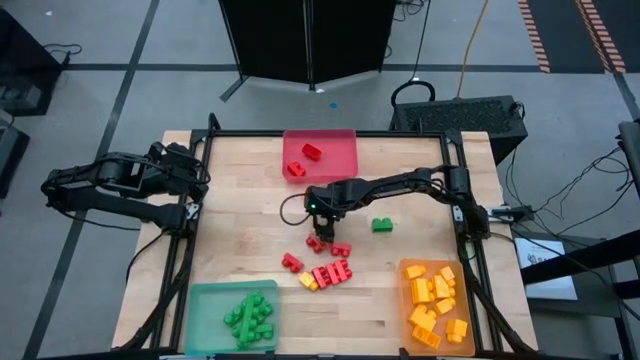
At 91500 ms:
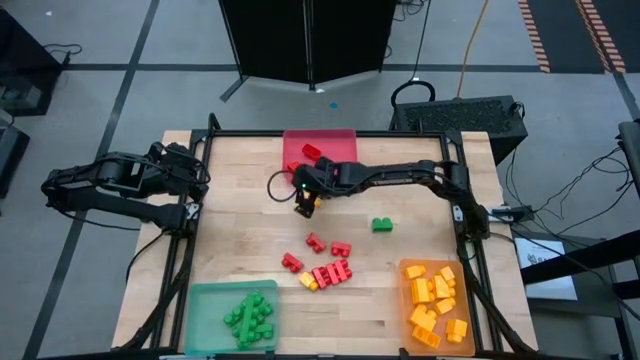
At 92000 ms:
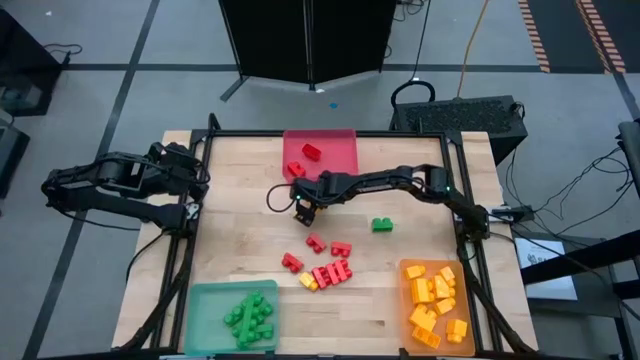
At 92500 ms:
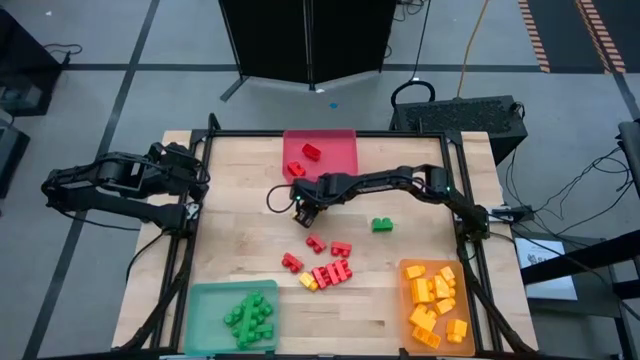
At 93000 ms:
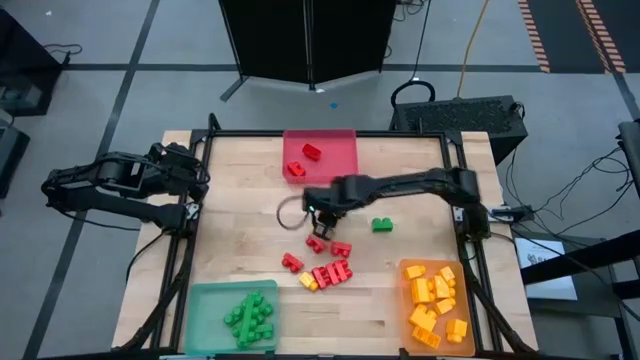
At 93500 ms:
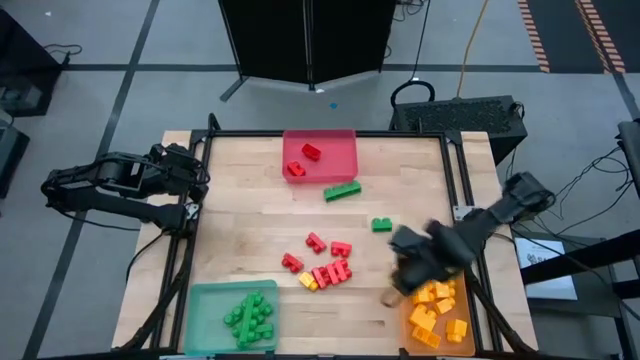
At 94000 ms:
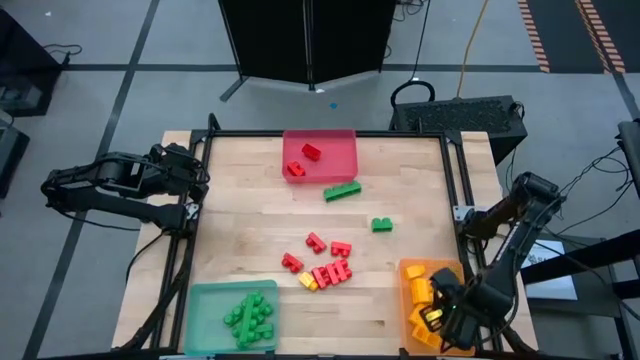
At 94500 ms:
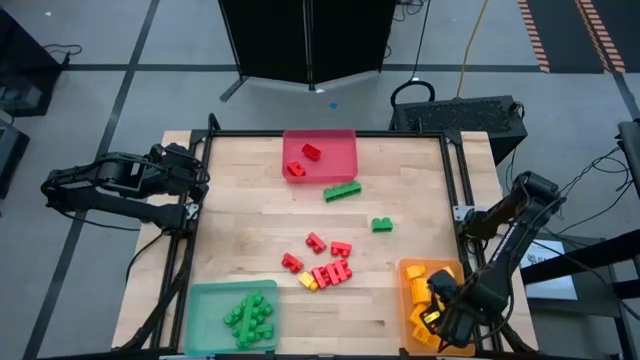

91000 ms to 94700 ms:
Task: Sort blocks
Put the yellow game piece into the orange bin

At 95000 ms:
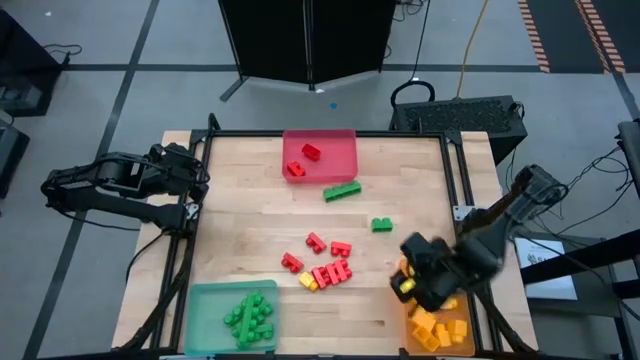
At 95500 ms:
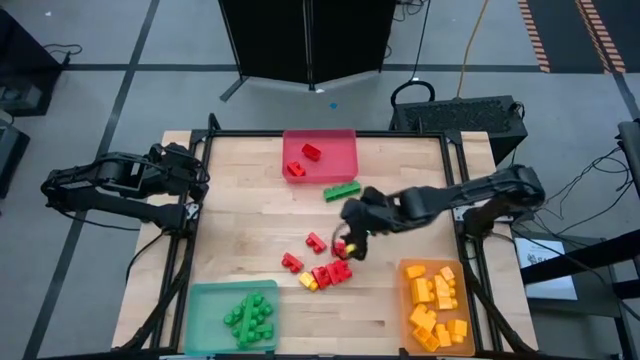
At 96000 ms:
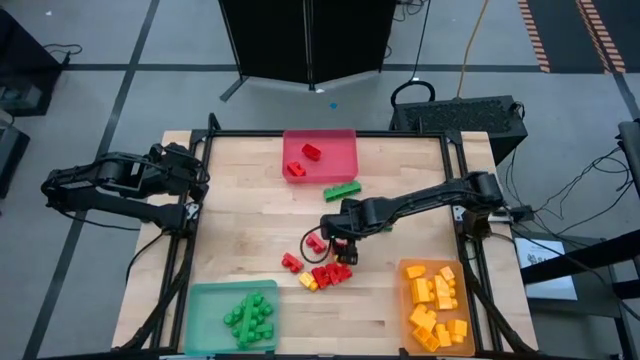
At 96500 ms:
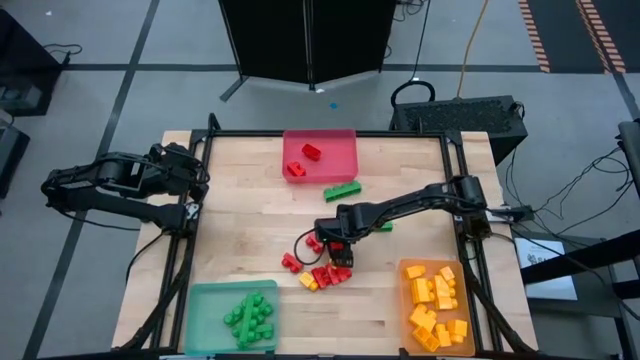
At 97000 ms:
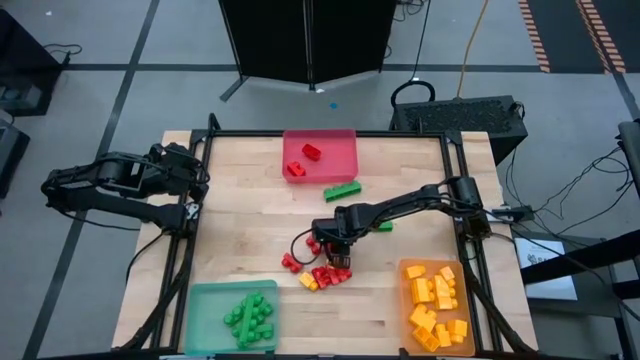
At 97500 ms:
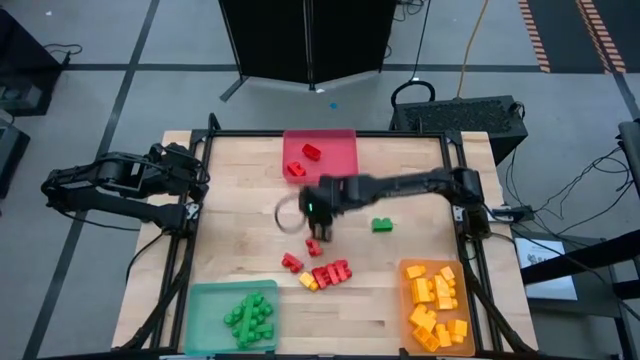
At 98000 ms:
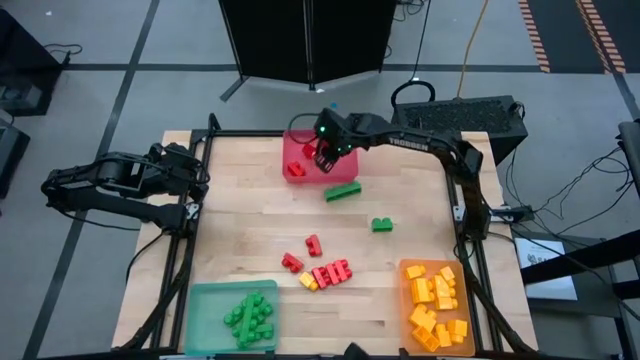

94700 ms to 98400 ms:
Put the red game piece into the red bin

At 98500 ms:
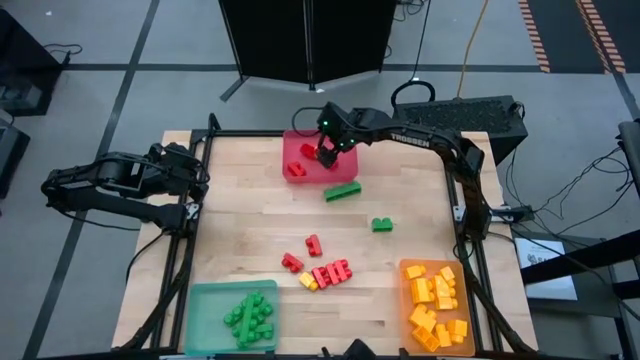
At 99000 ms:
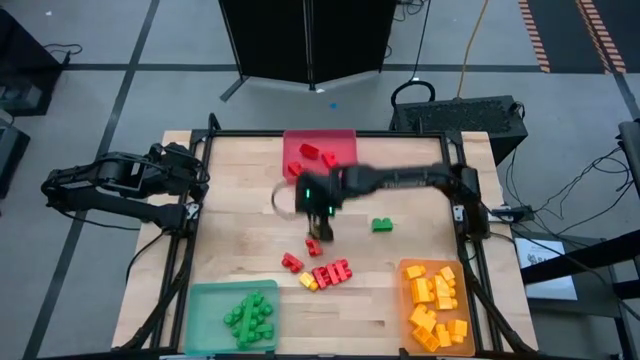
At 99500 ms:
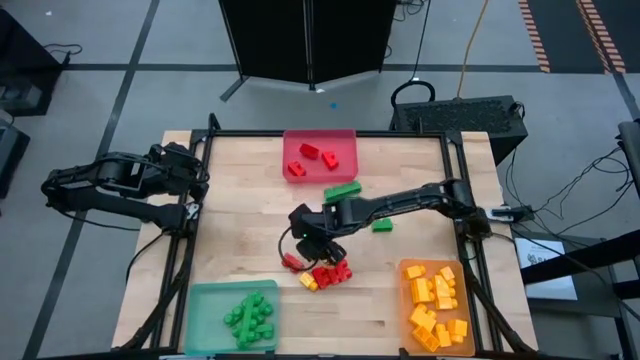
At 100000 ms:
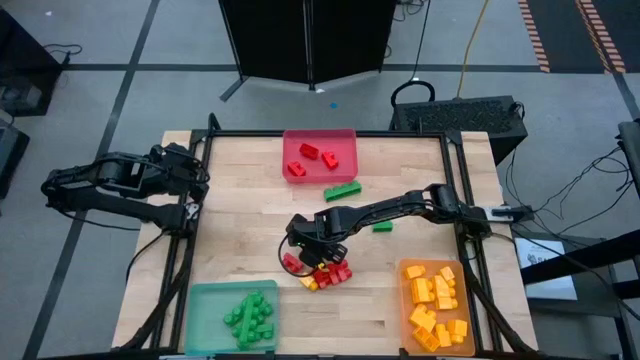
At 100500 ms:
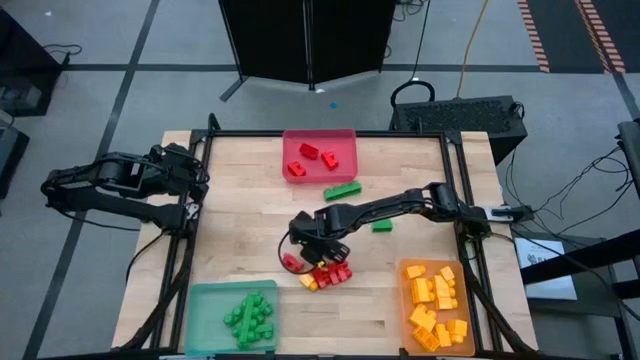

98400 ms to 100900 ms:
Put the red game piece into the red bin

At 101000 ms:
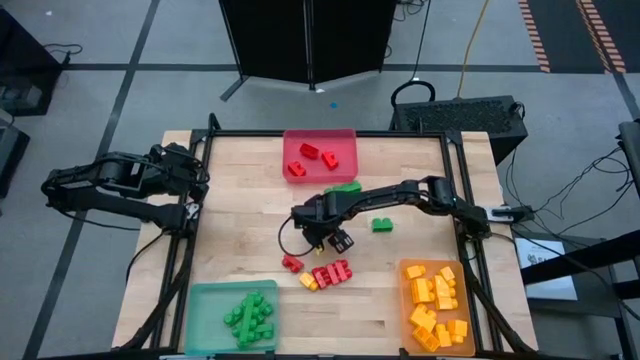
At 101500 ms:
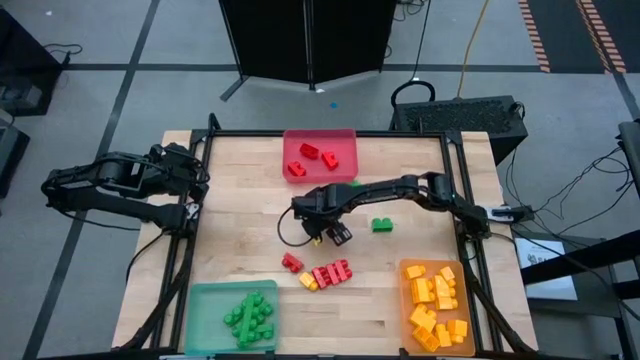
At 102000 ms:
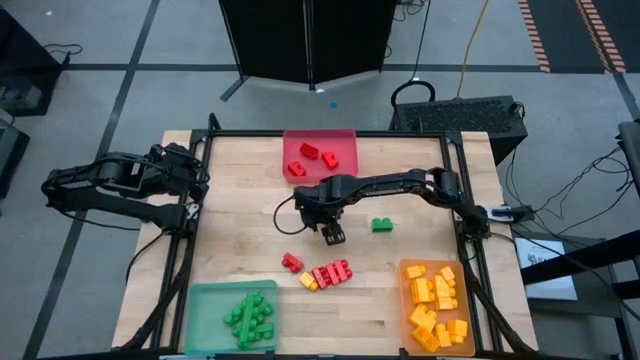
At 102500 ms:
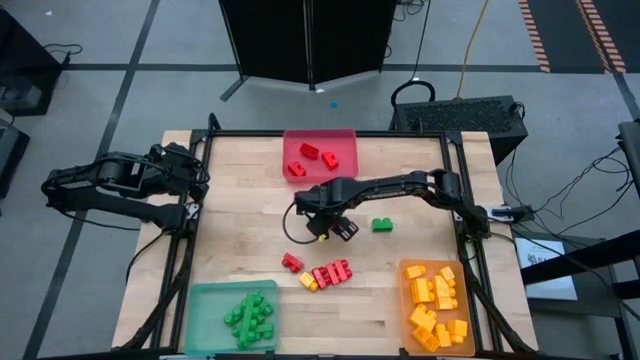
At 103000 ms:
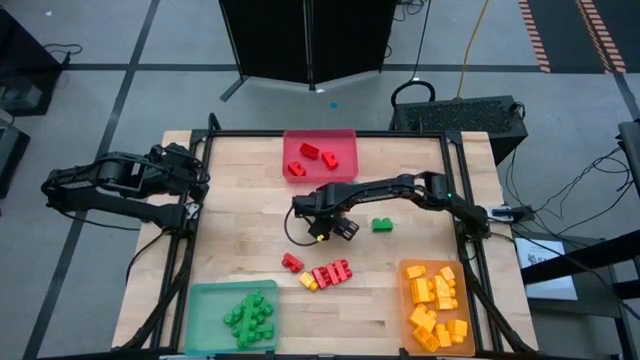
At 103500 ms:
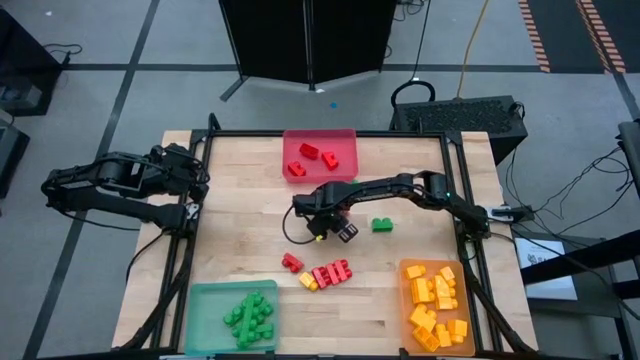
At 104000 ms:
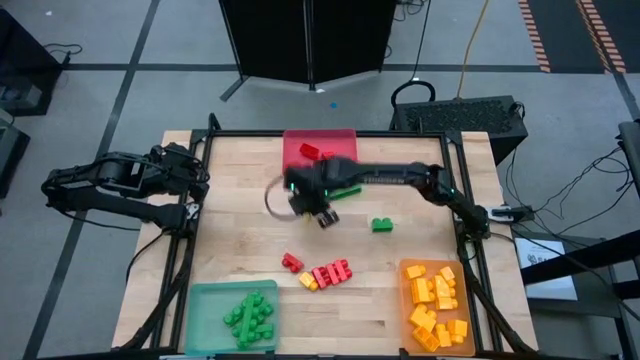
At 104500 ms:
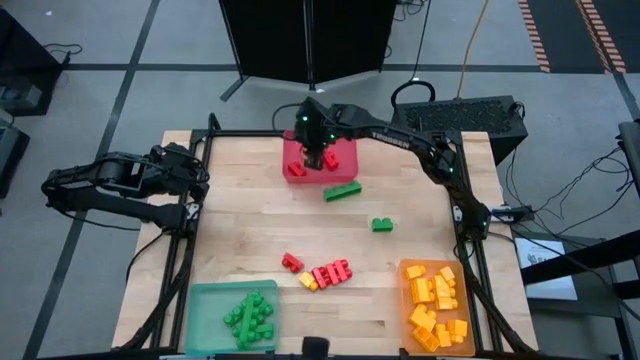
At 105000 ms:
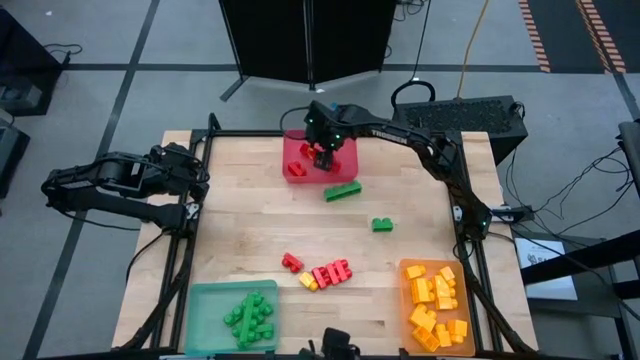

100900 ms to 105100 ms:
Put the red game piece into the red bin

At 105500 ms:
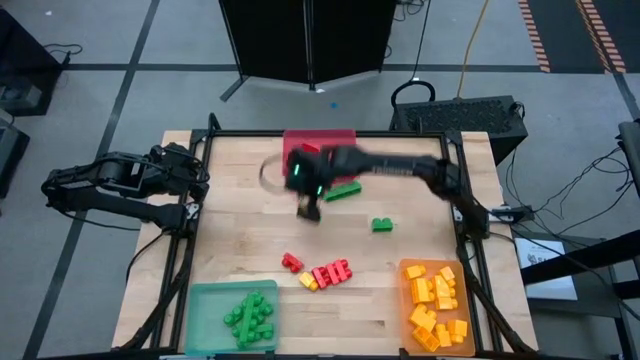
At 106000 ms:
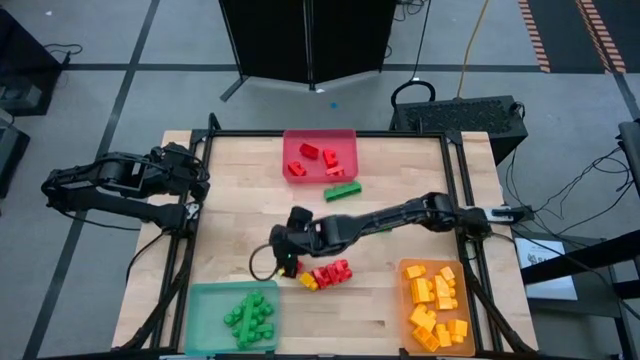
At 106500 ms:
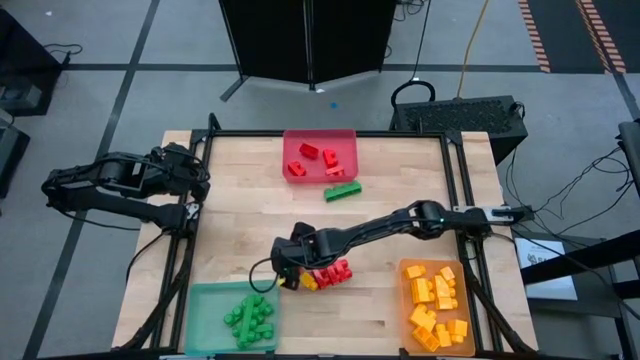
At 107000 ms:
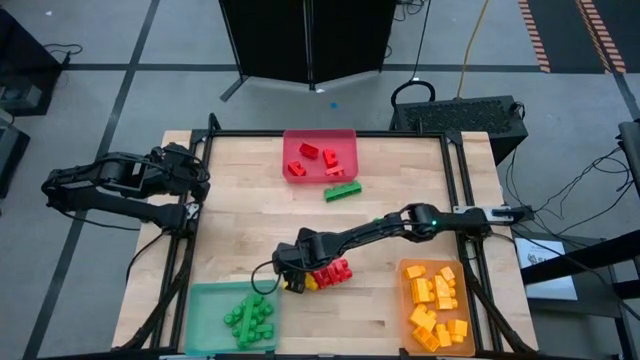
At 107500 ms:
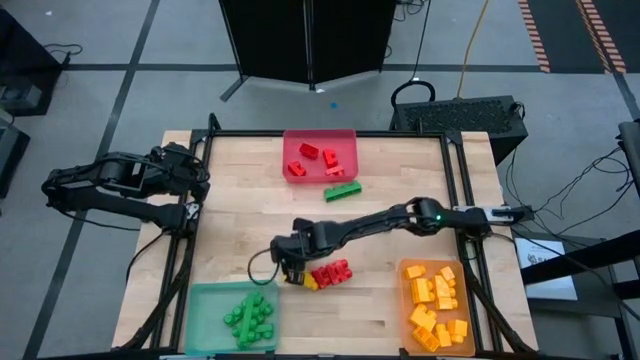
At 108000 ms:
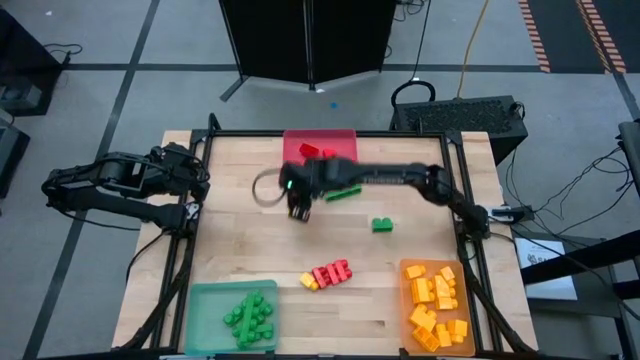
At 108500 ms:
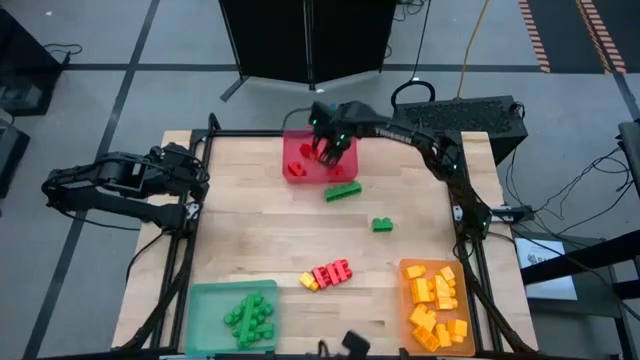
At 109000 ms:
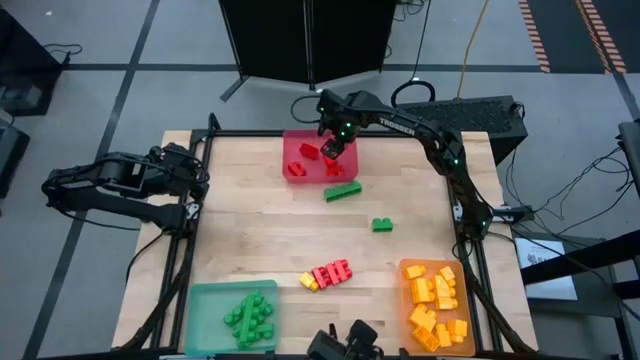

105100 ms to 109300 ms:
Put the red game piece into the red bin

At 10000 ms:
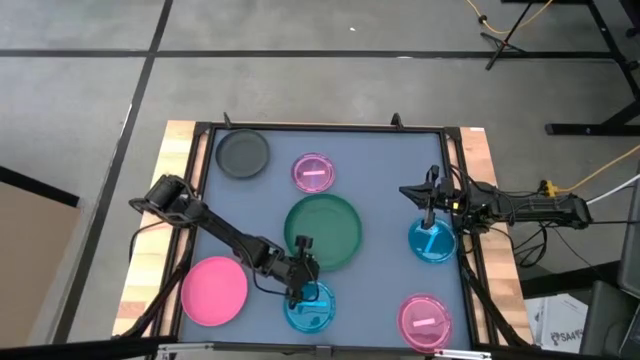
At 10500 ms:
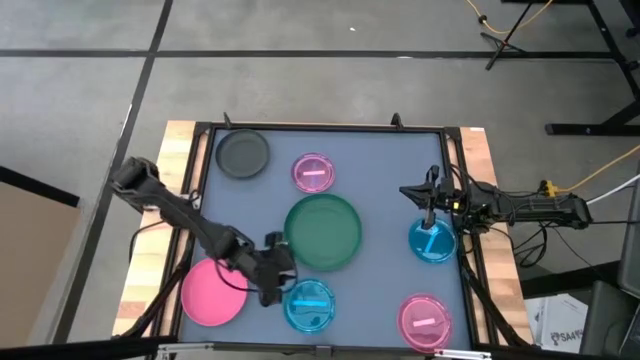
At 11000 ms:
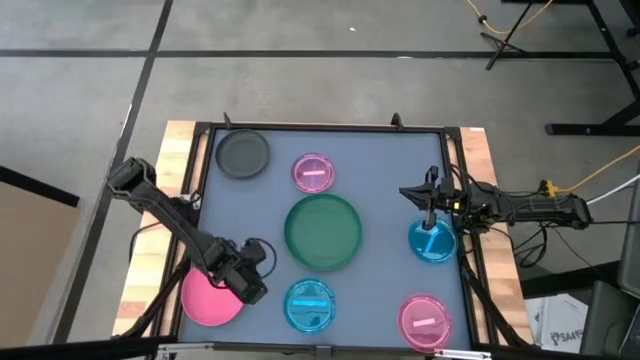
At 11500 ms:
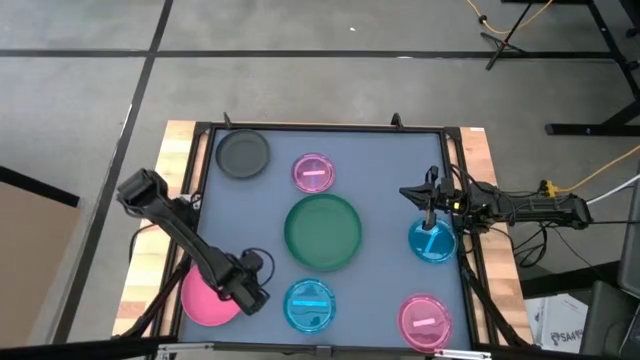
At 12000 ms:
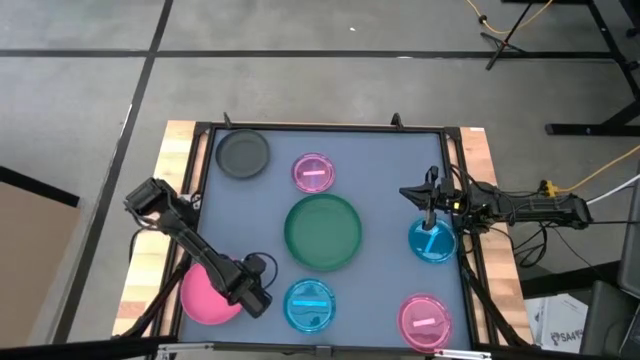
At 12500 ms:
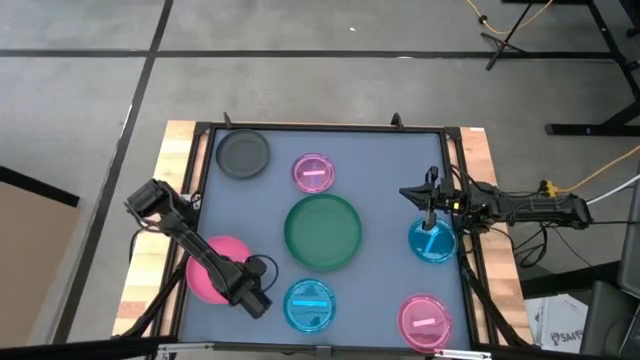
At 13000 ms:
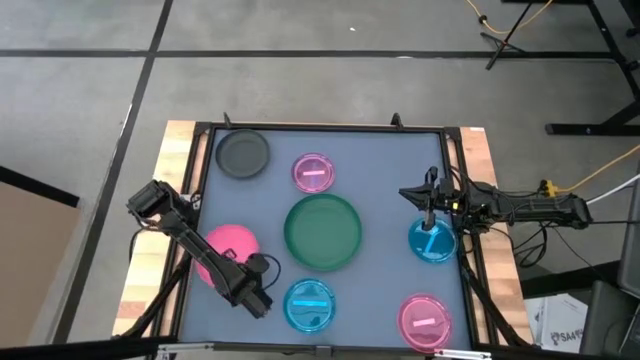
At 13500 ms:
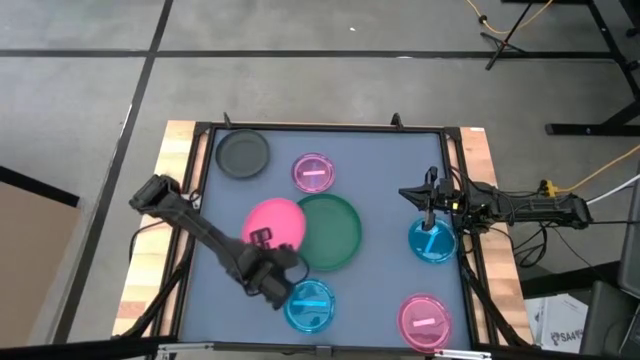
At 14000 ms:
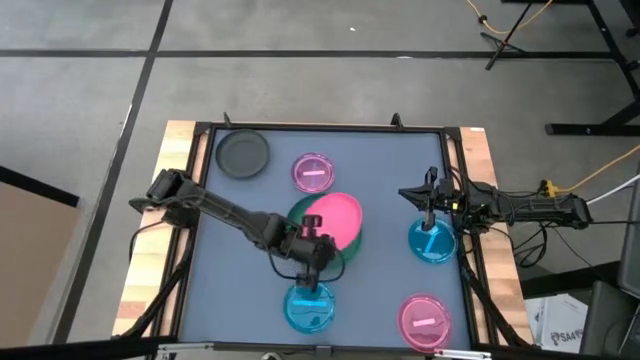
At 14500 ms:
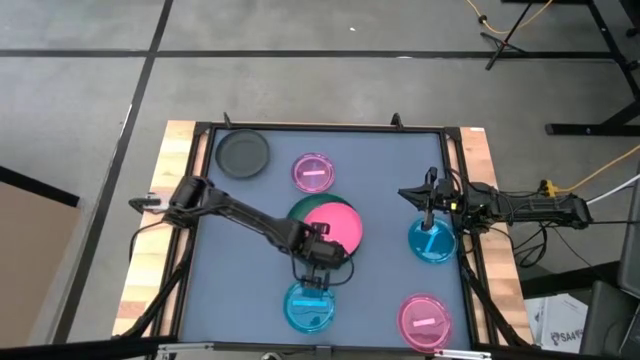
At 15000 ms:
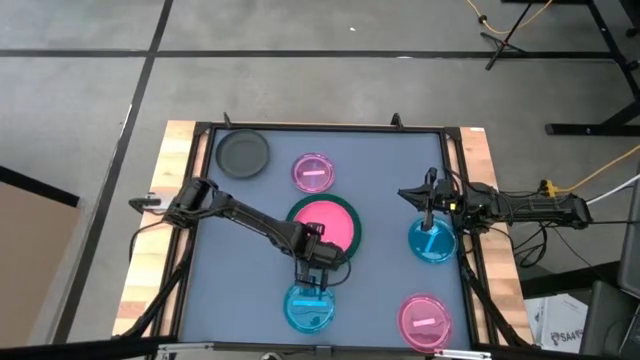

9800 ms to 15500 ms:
Task: Stack plastic plates
Stack the pink plate on top of the green plate
